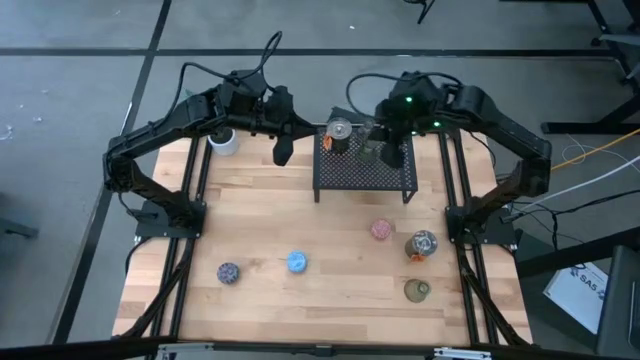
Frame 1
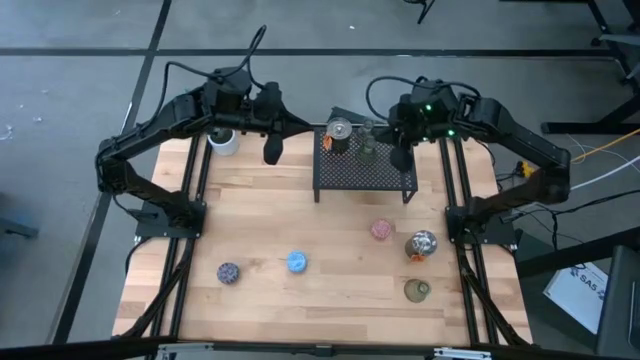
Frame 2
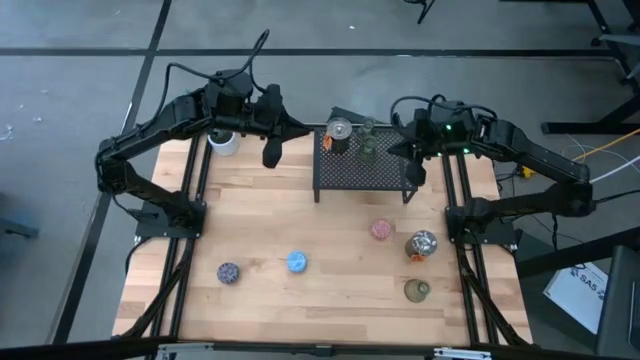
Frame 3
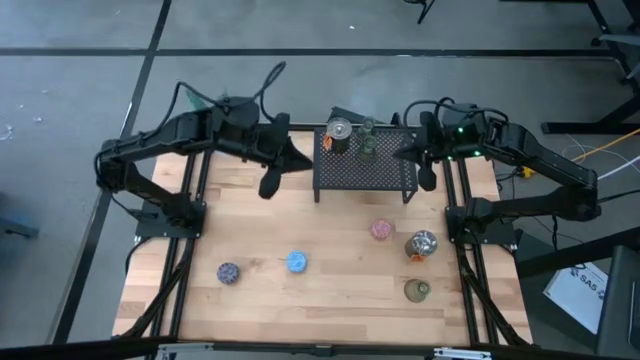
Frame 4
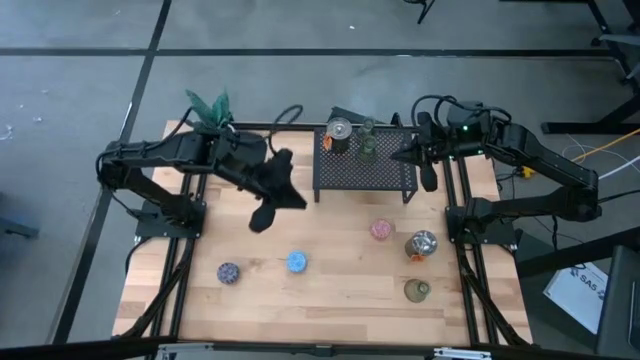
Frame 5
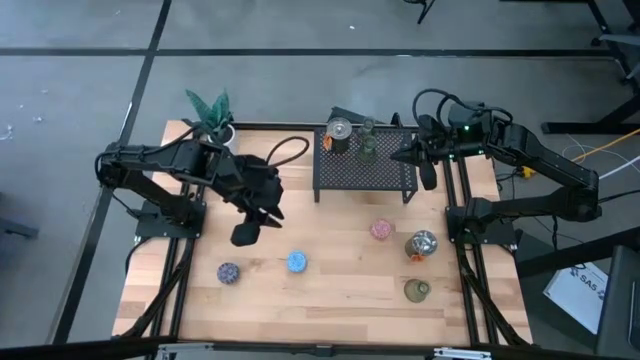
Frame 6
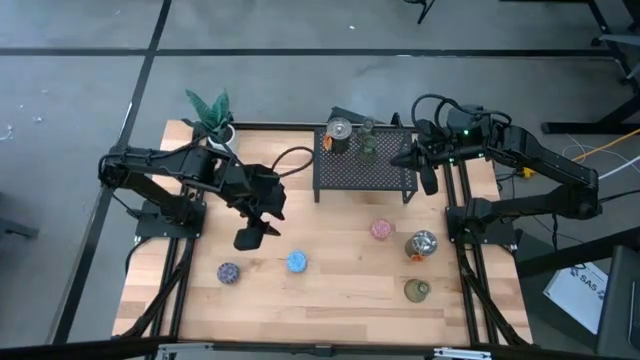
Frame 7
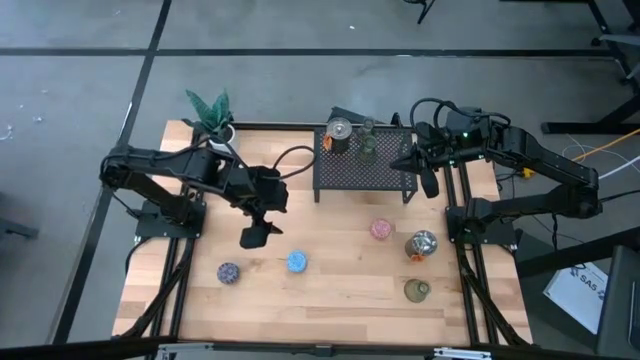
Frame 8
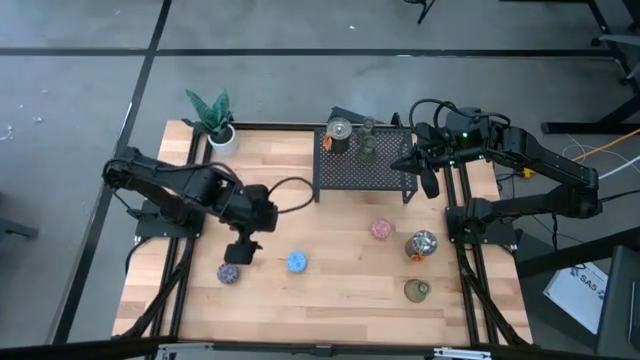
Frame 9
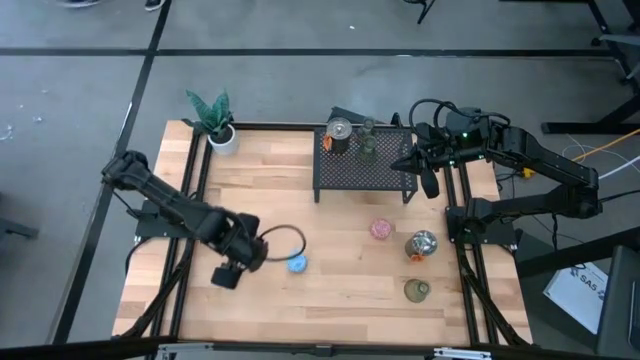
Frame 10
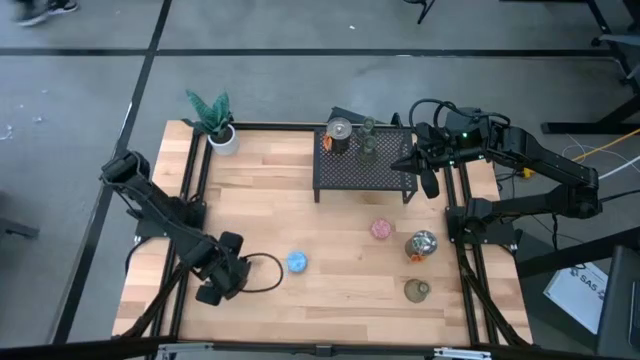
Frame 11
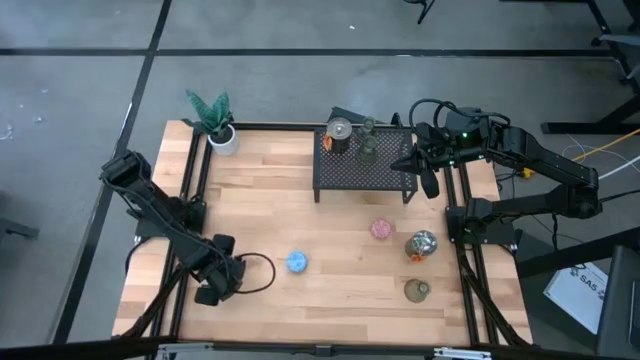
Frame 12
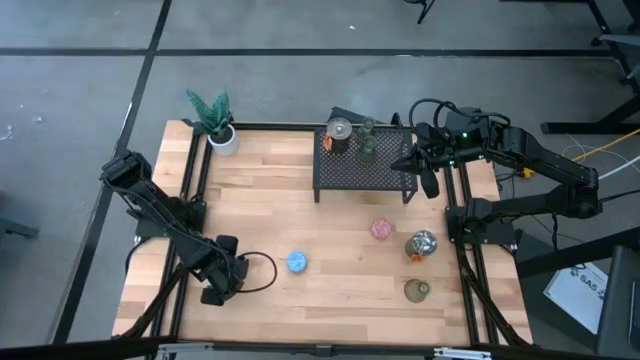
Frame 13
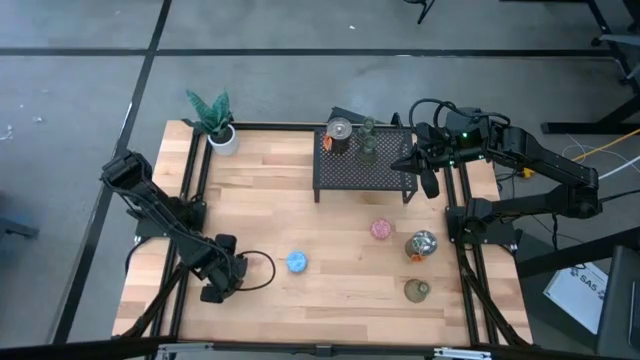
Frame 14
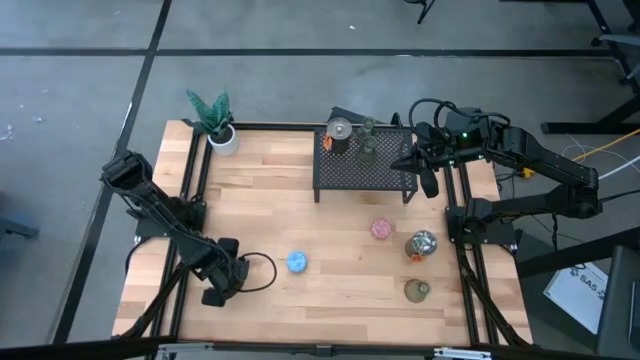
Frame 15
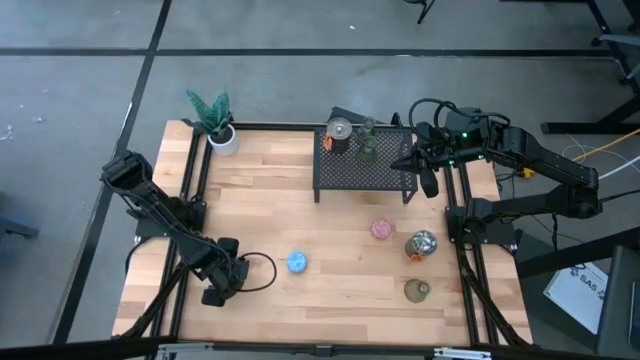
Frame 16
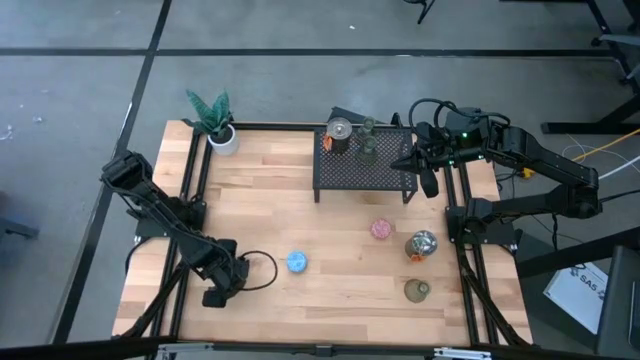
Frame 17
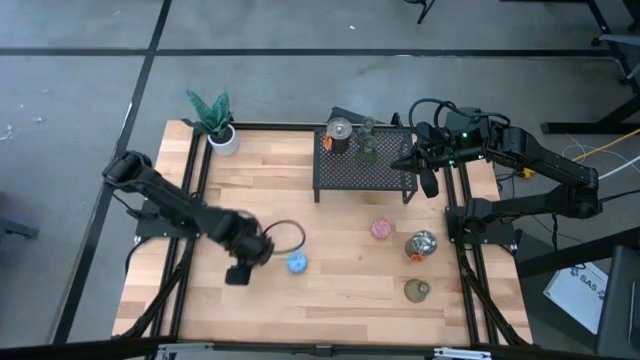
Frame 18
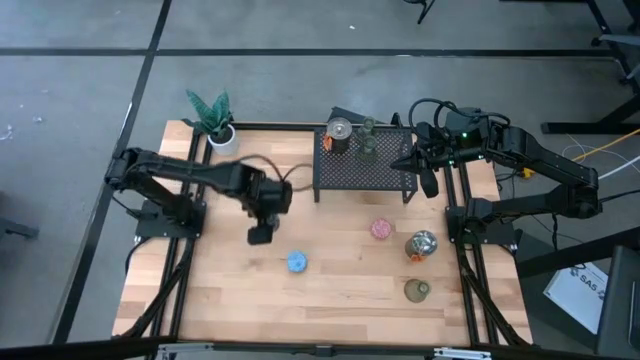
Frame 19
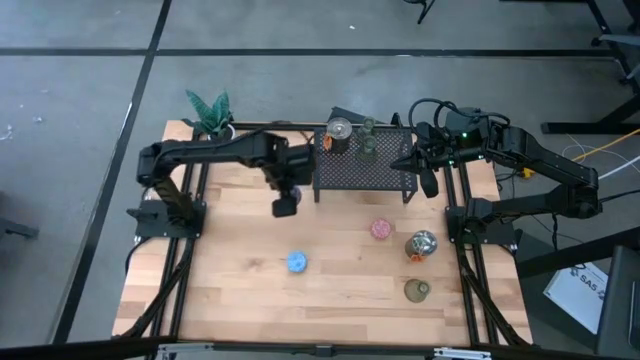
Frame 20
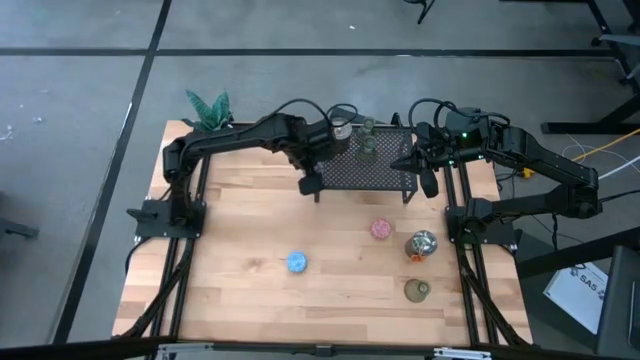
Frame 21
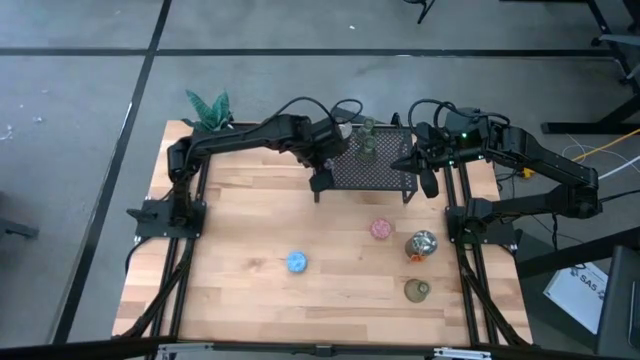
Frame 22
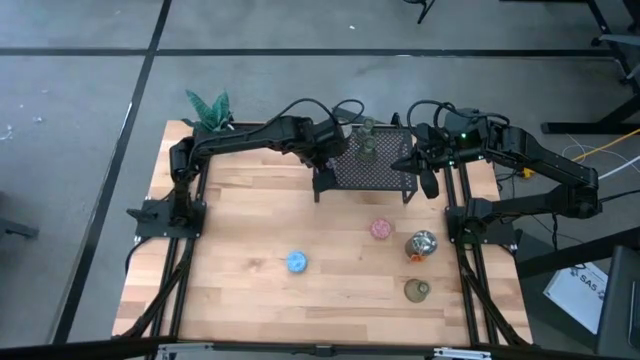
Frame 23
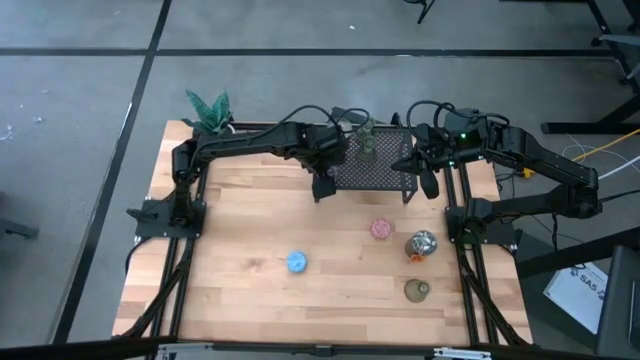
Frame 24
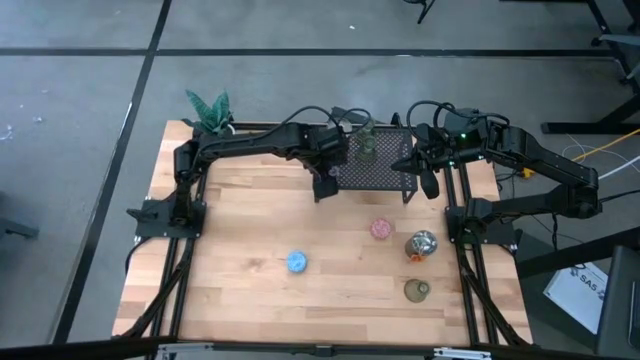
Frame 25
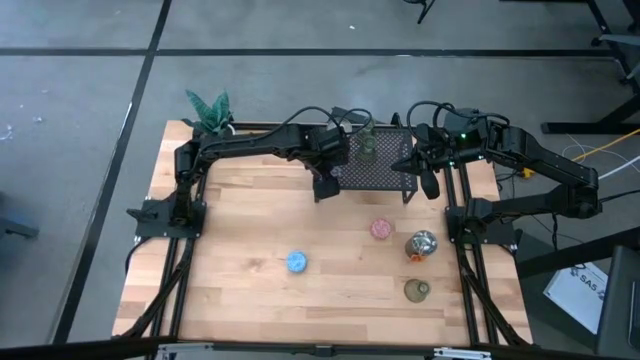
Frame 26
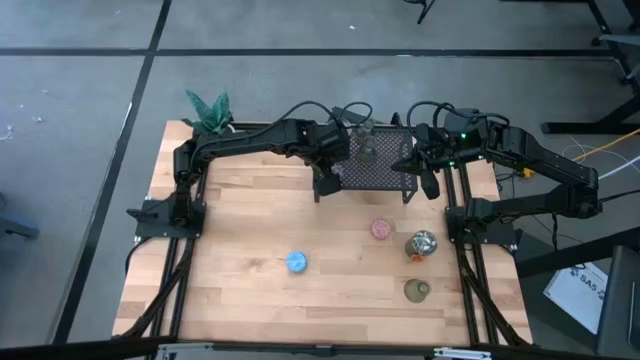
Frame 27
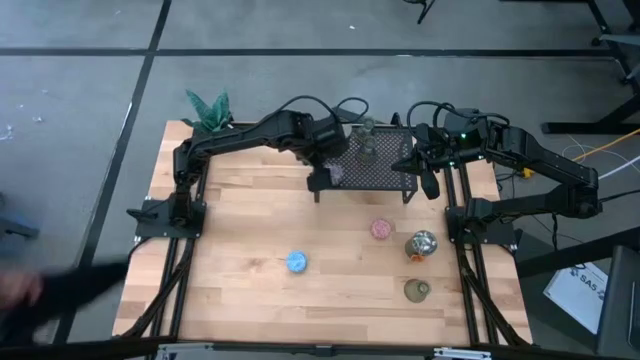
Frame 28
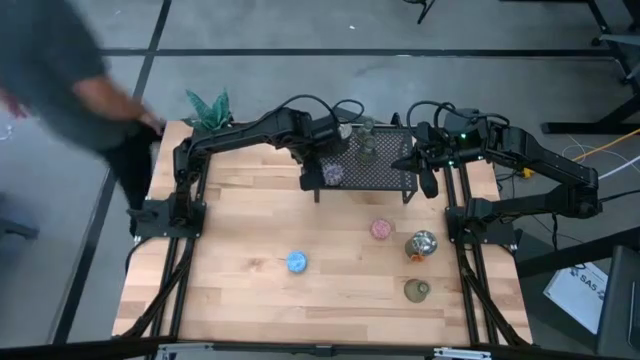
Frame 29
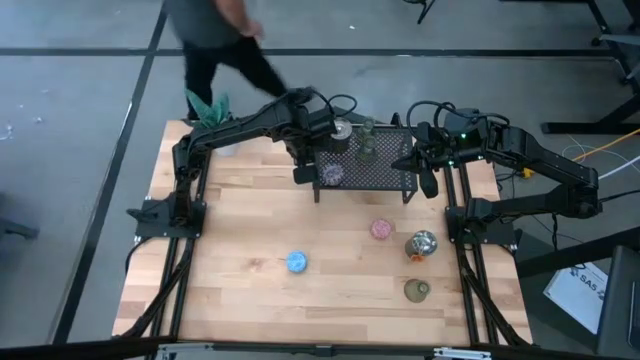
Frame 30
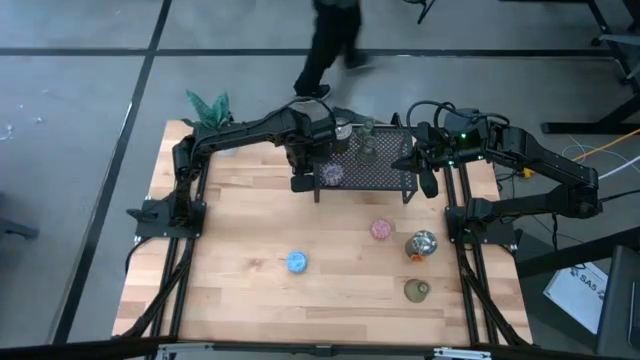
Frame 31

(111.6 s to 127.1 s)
Task: Pick & Place candle stick holders
Put the red scented candle on the shelf

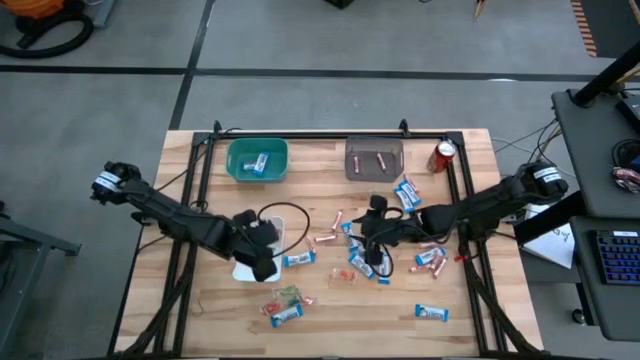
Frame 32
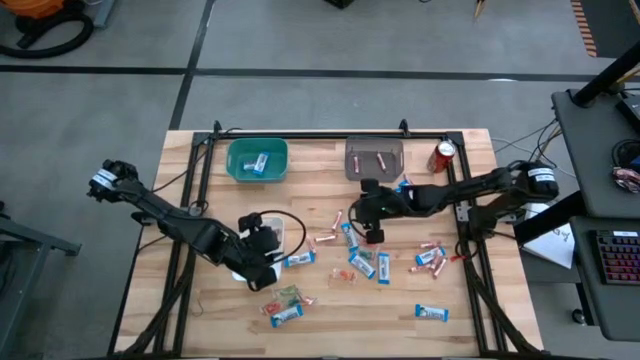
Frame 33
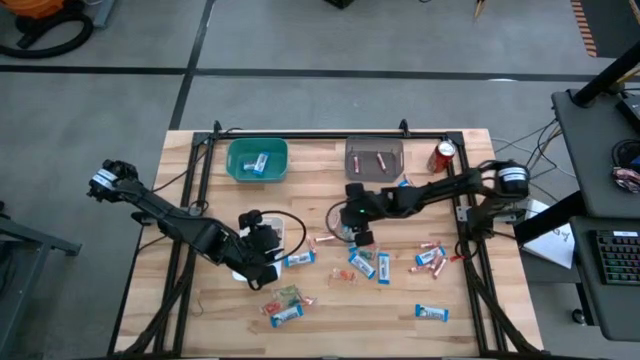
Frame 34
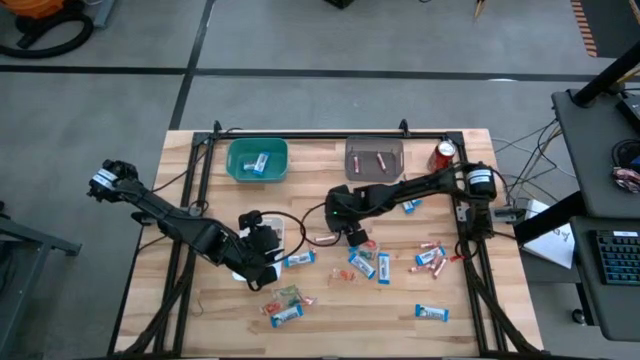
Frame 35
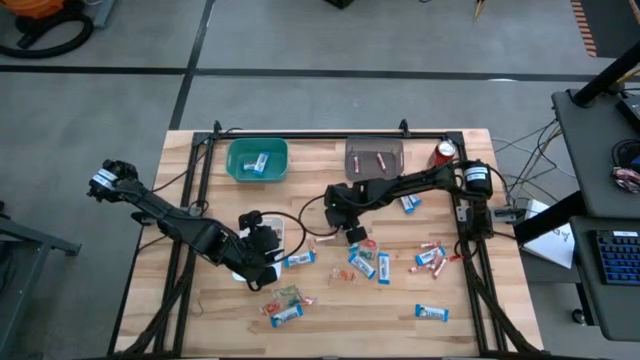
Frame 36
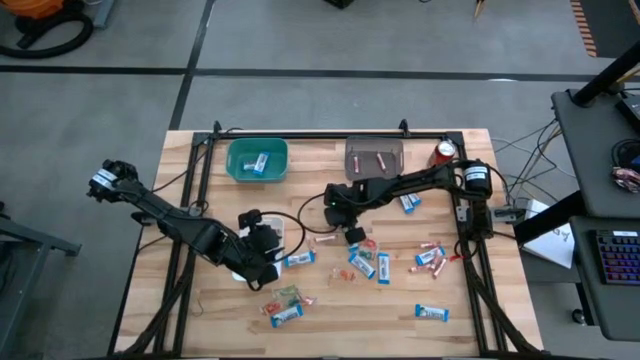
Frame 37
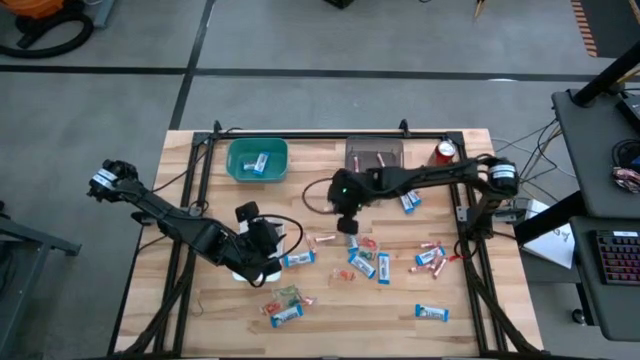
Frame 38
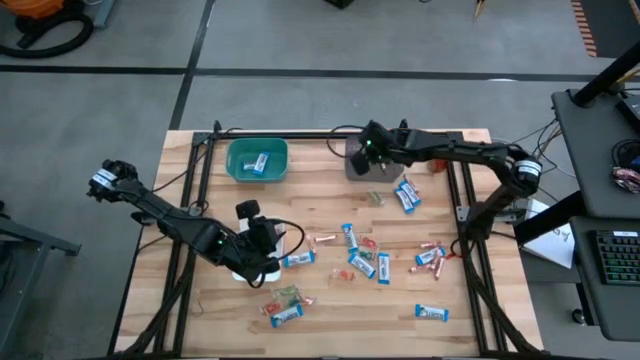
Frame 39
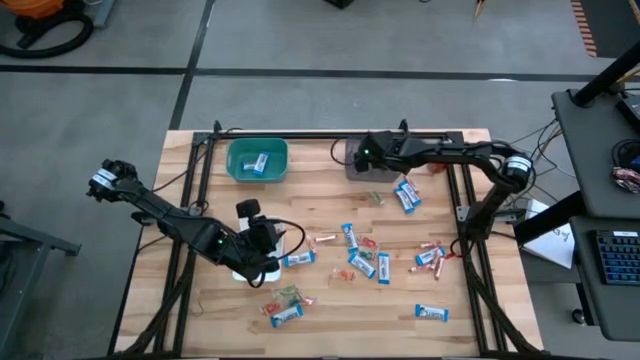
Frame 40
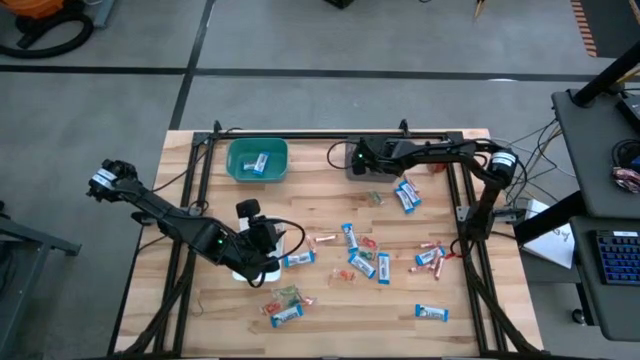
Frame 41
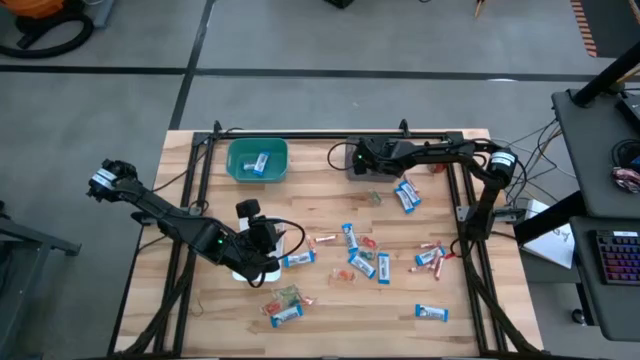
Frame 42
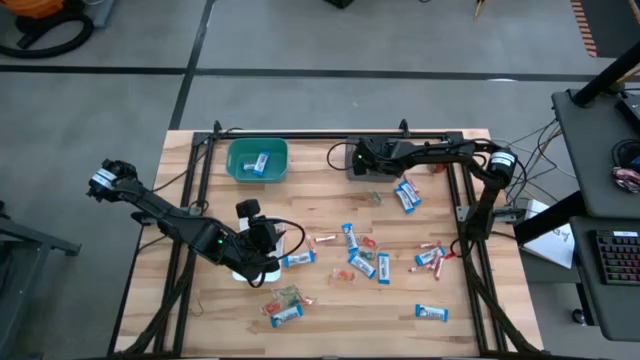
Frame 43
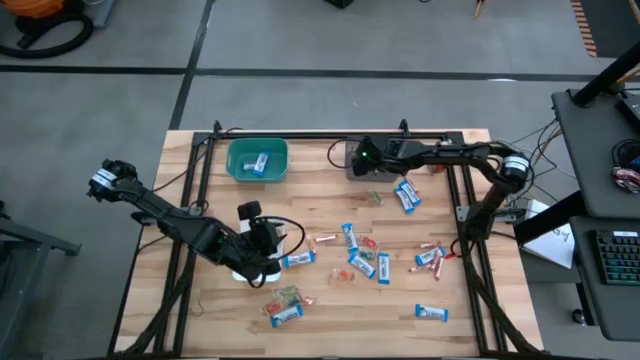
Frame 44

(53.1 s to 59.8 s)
Task: Sort candy
Put the transparent candy rolls into the black bin
